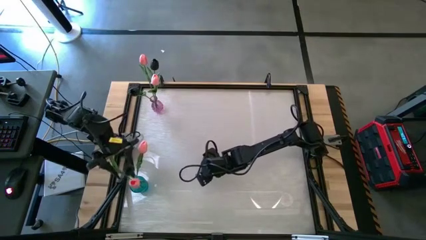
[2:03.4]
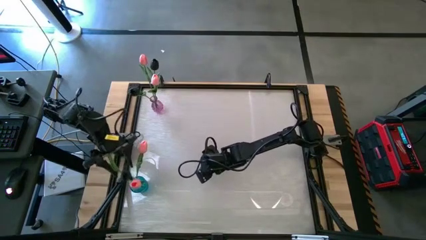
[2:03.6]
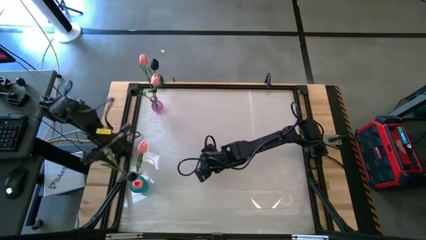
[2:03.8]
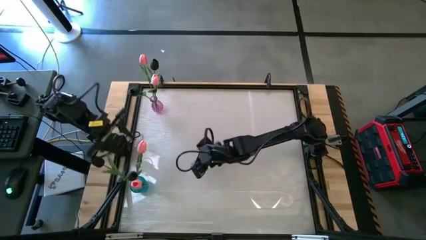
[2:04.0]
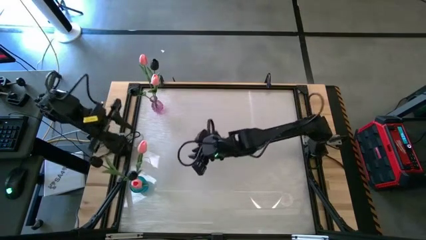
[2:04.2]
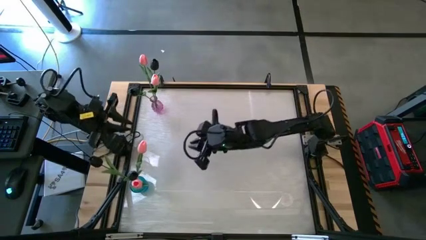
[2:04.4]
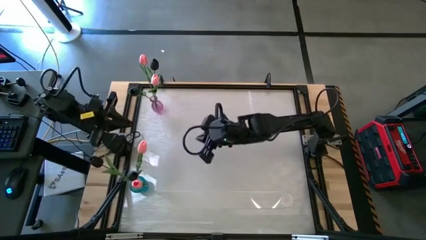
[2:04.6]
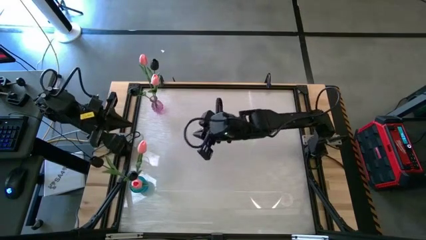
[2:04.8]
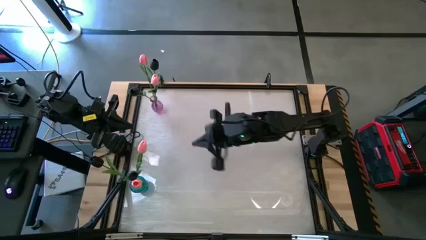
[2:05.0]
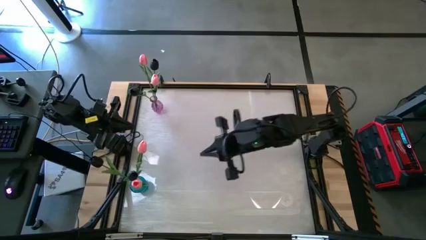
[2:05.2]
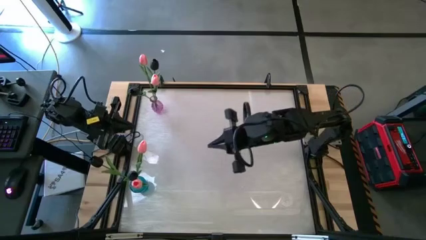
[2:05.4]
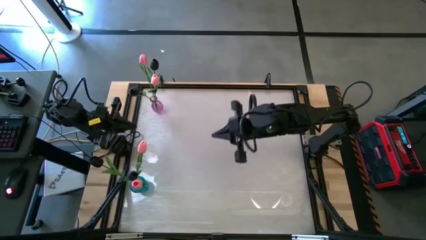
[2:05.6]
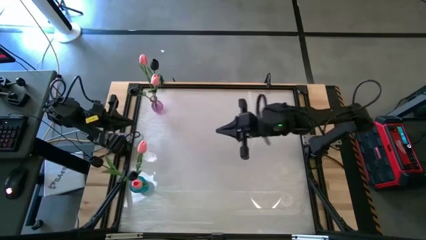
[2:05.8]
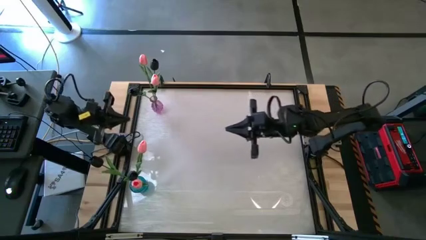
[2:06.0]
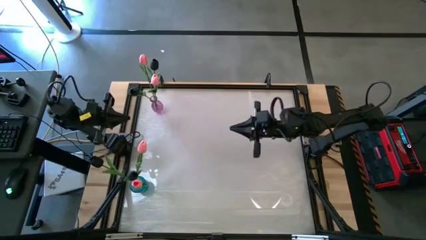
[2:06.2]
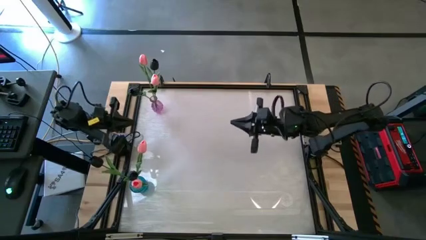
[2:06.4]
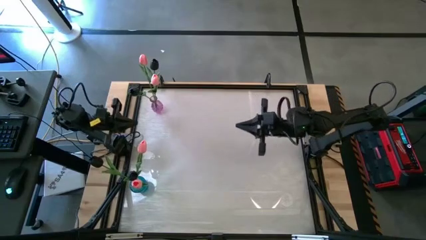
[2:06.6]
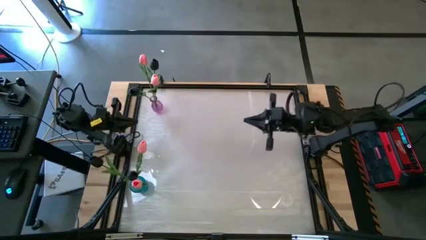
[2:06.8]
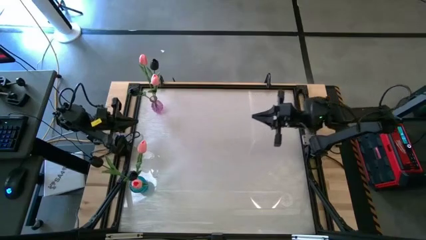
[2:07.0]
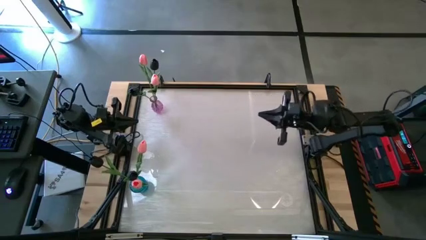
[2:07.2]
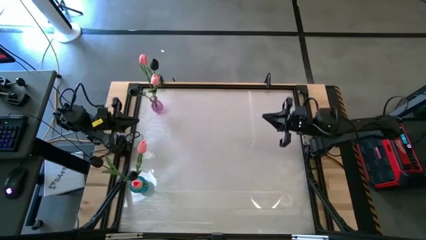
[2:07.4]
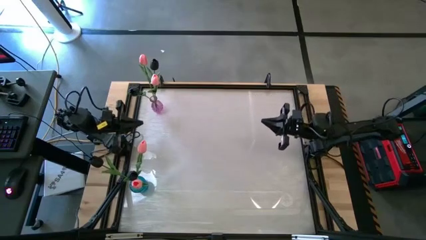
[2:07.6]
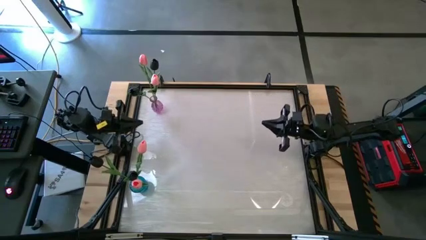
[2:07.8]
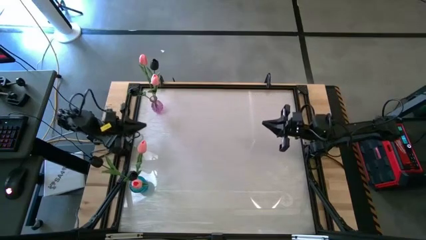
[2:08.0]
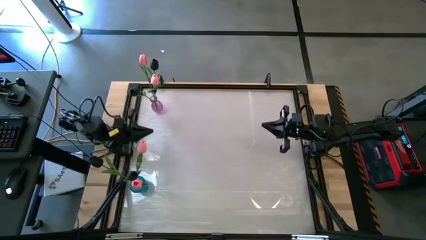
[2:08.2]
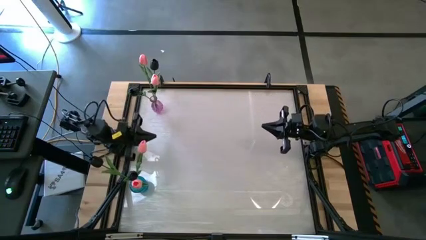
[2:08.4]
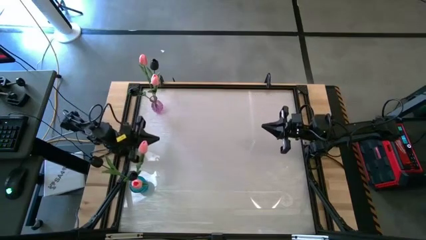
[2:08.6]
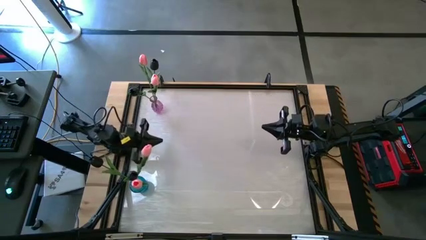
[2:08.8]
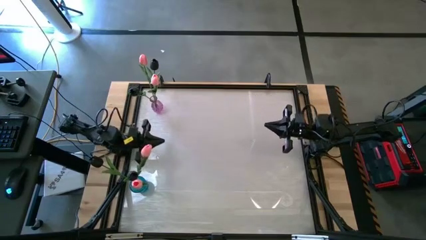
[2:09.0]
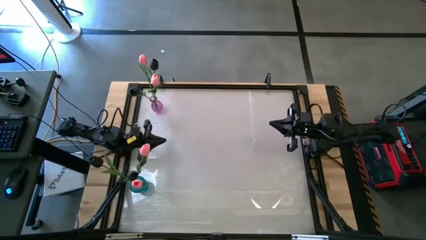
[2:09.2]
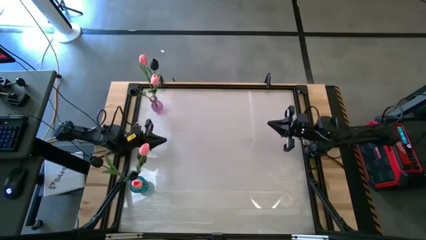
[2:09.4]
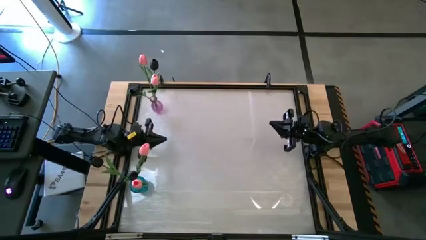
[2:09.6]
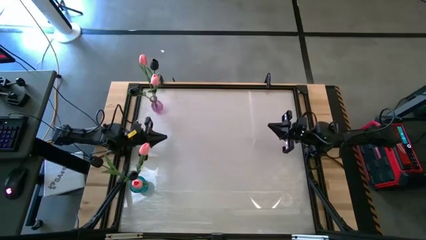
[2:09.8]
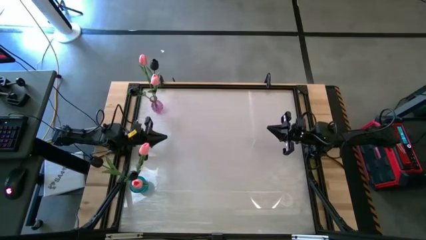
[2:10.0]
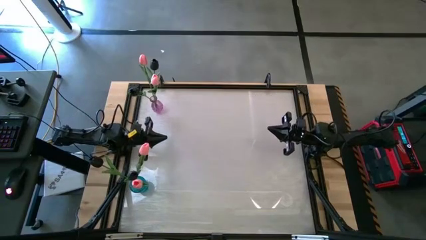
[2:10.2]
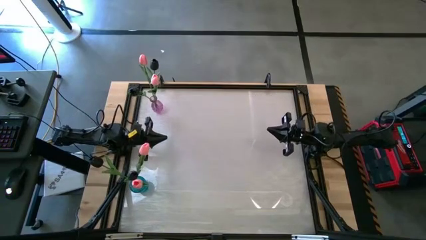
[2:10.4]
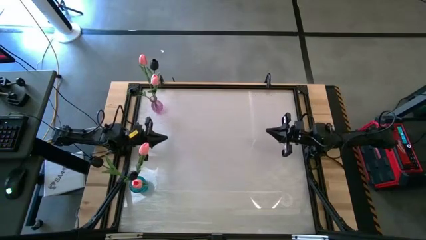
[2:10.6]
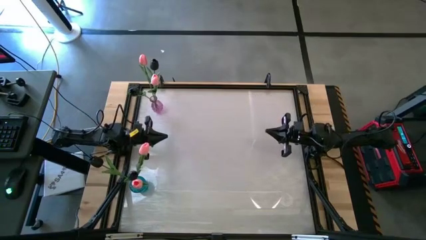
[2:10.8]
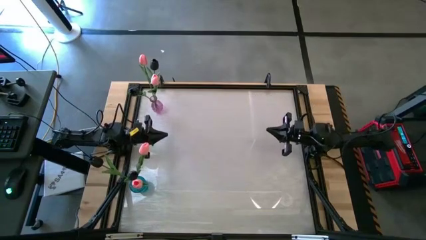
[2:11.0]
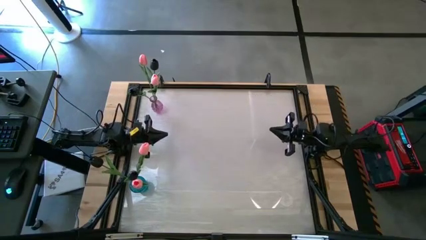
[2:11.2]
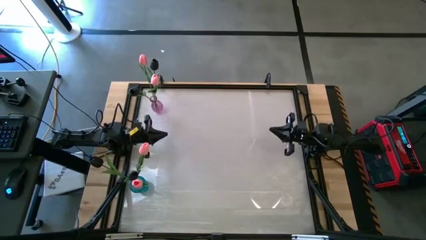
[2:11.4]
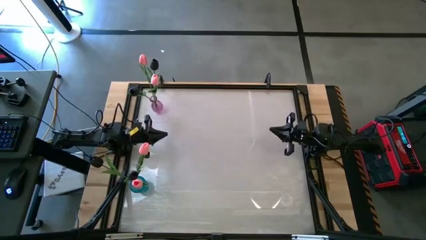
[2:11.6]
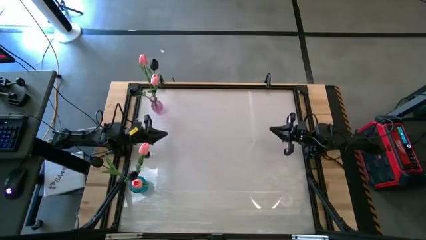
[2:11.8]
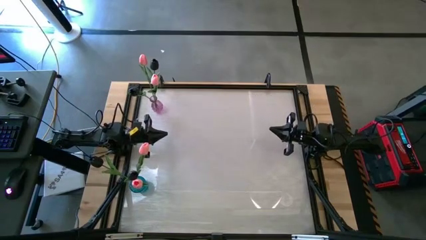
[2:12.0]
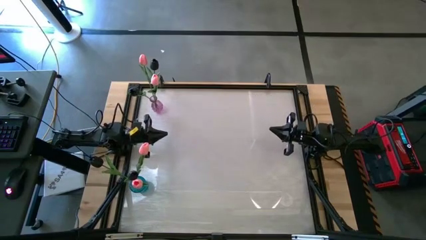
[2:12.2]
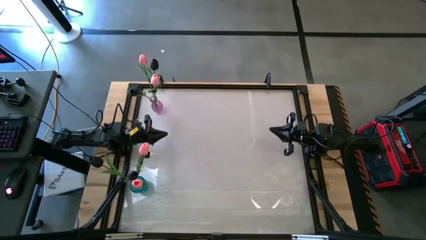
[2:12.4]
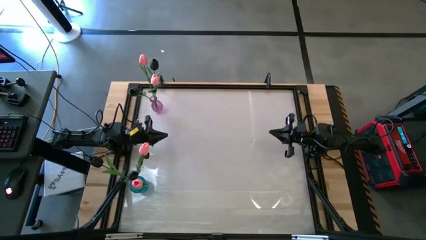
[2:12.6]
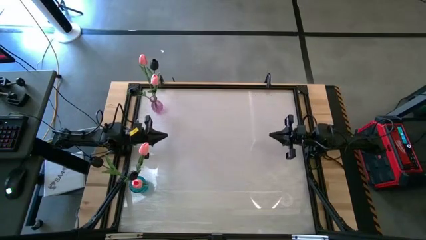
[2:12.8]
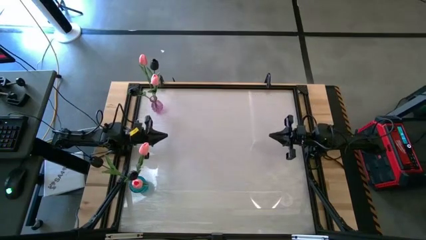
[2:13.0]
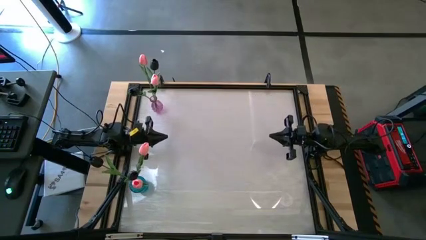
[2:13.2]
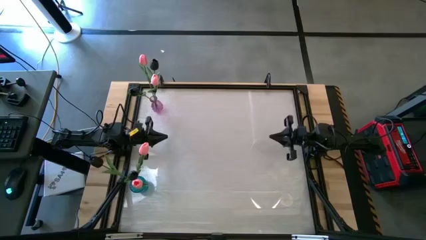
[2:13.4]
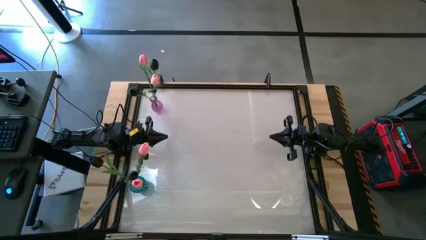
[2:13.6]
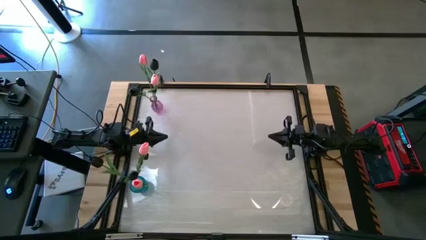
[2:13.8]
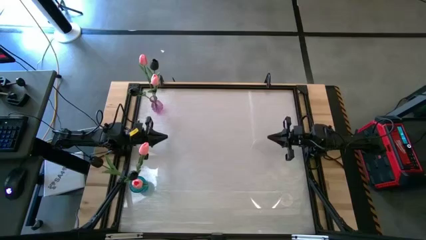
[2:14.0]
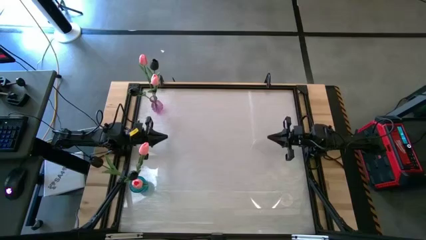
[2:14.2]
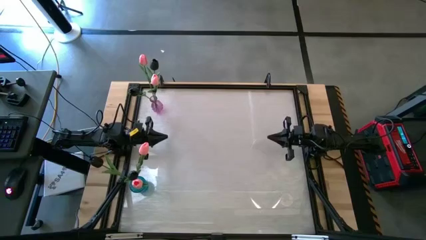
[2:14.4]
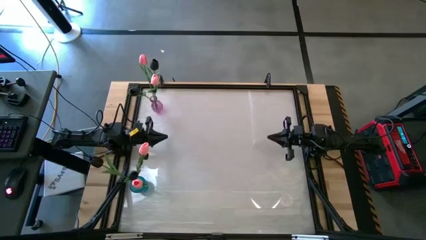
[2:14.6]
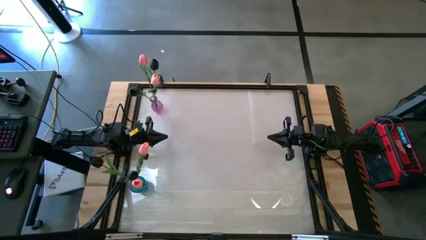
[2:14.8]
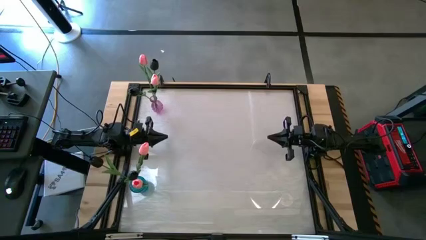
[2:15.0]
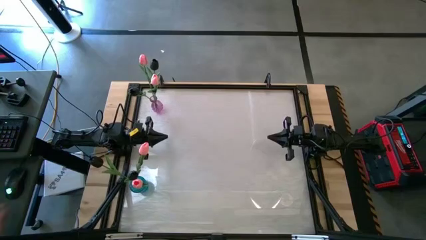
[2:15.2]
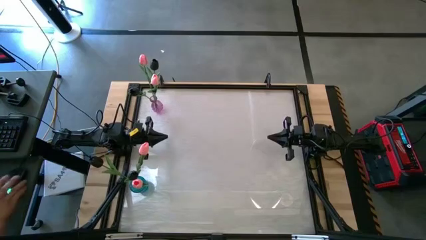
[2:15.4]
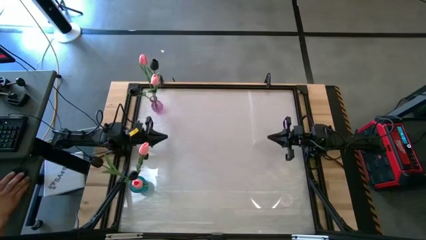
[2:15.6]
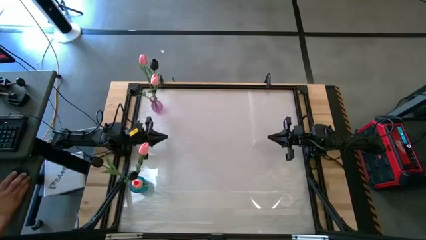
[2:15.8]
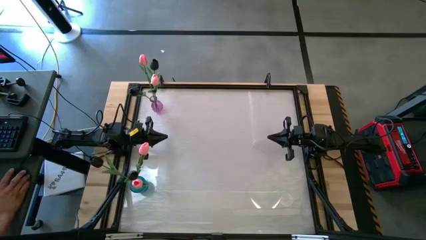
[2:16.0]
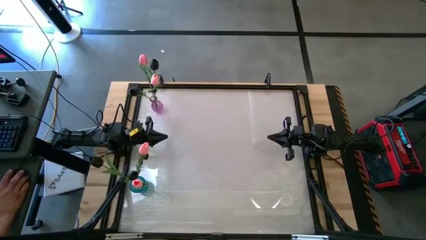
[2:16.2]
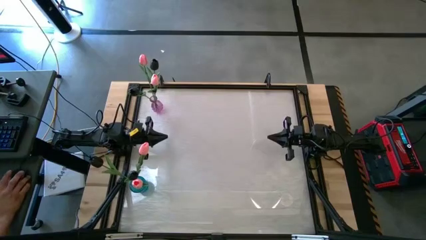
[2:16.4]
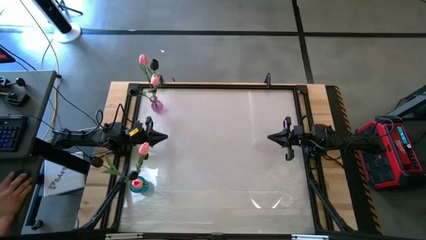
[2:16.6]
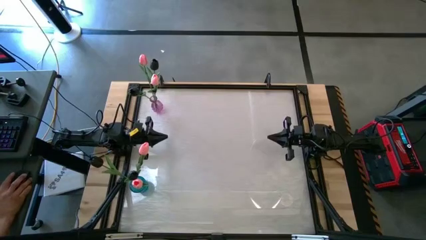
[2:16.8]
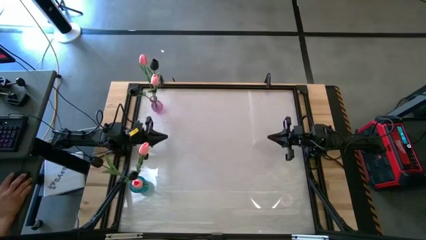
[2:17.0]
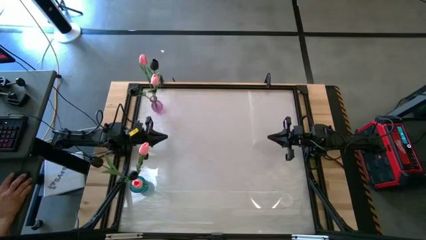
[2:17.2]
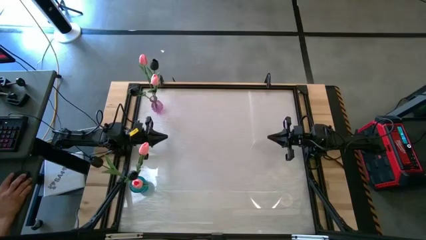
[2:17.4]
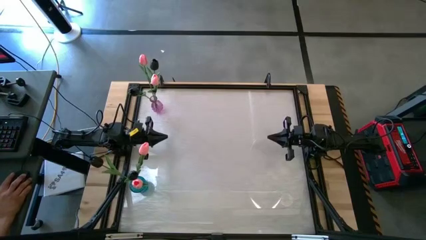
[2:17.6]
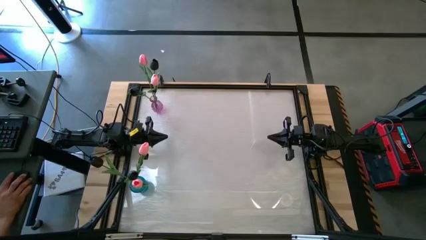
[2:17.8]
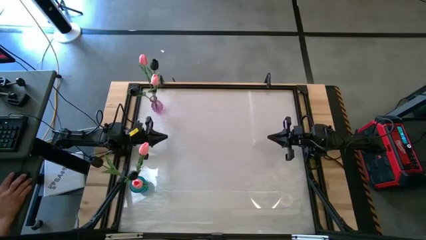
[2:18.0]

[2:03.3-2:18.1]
Task: Sort flowers into vase by color
Return to Home Position
